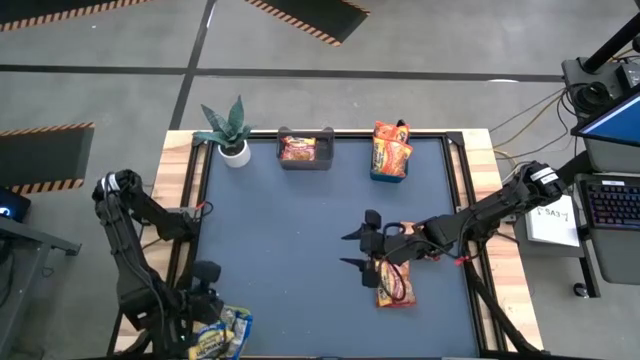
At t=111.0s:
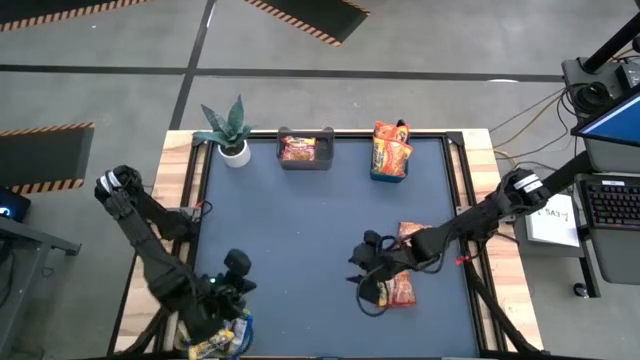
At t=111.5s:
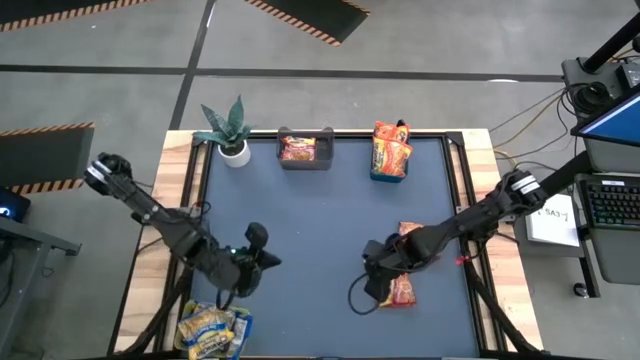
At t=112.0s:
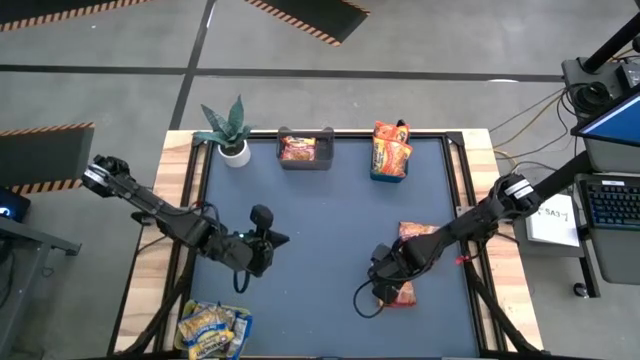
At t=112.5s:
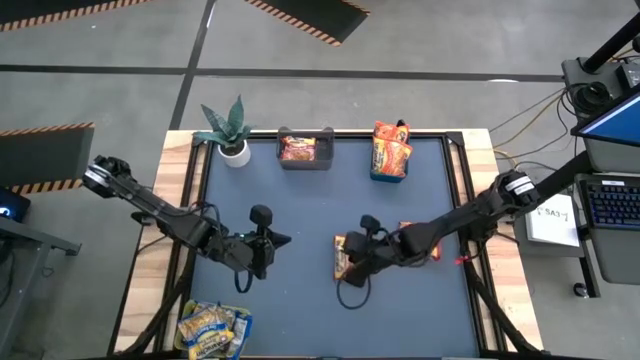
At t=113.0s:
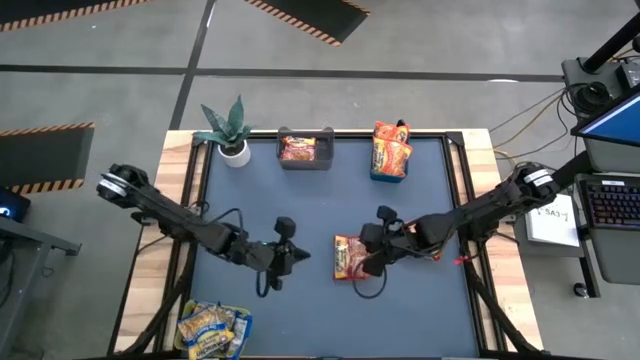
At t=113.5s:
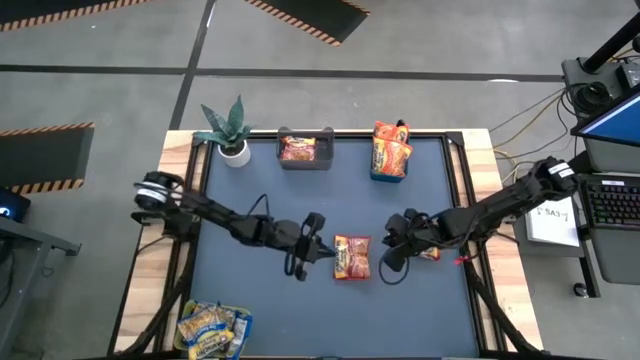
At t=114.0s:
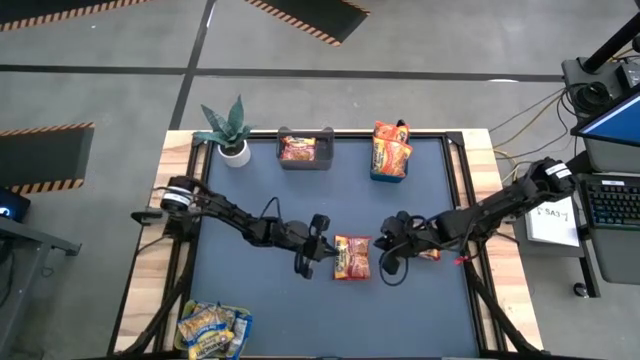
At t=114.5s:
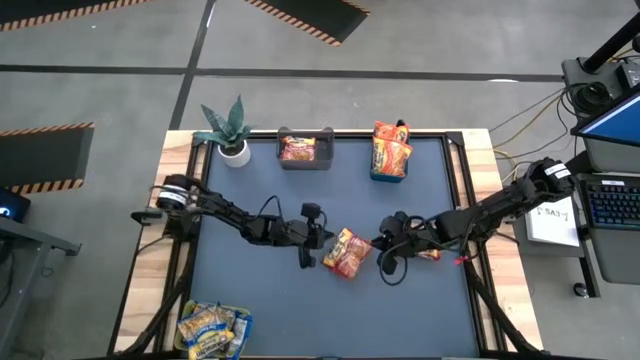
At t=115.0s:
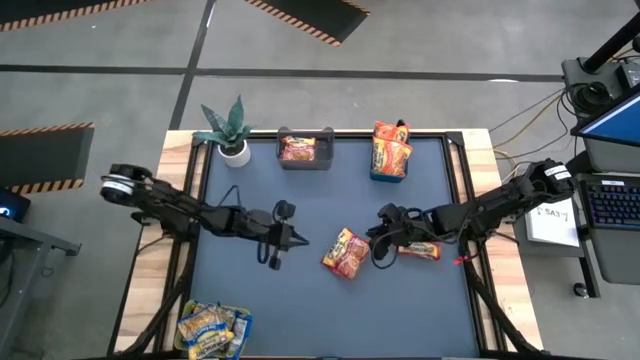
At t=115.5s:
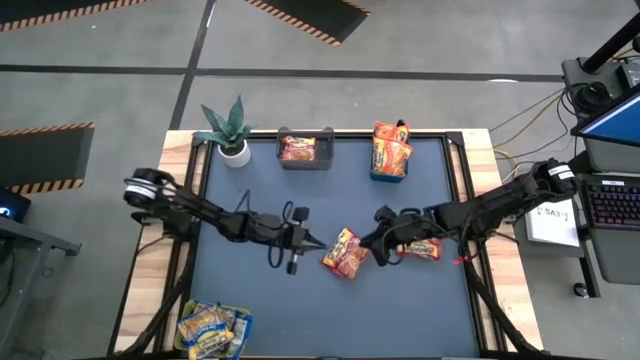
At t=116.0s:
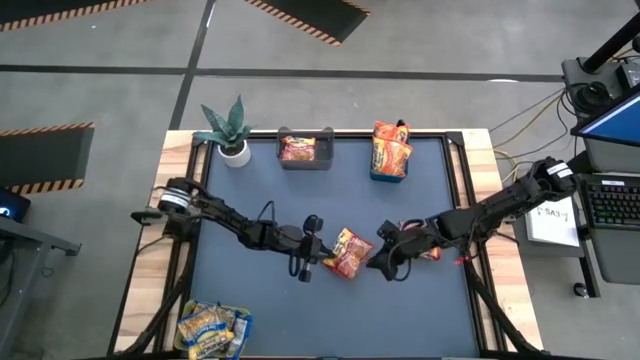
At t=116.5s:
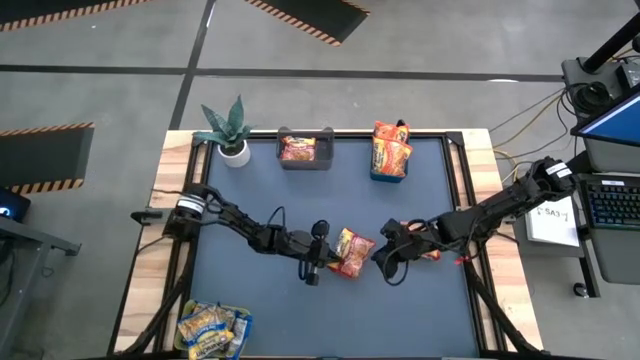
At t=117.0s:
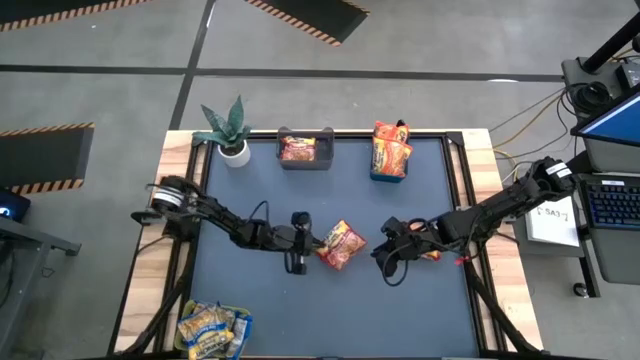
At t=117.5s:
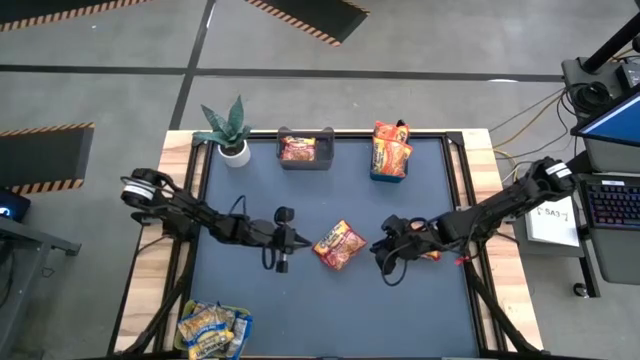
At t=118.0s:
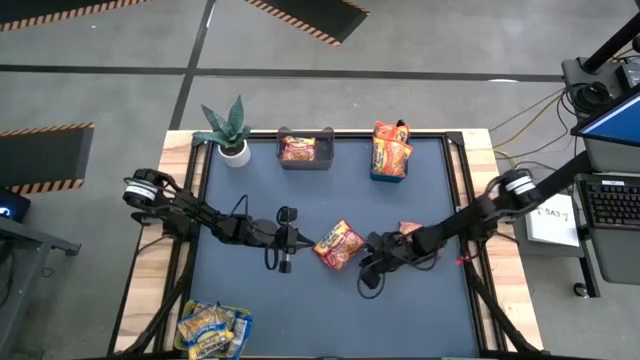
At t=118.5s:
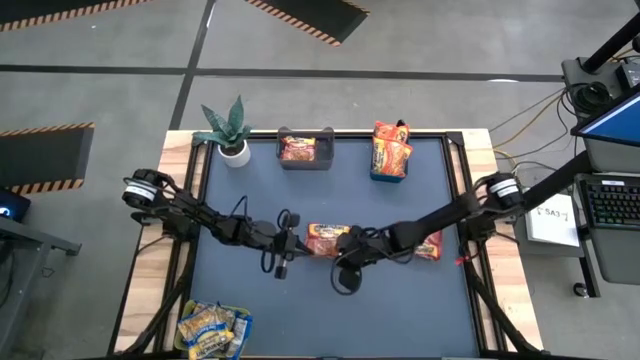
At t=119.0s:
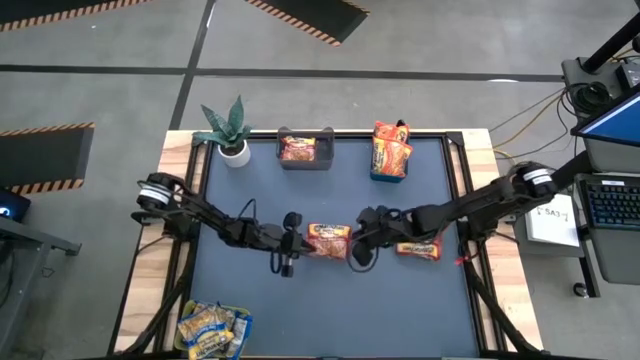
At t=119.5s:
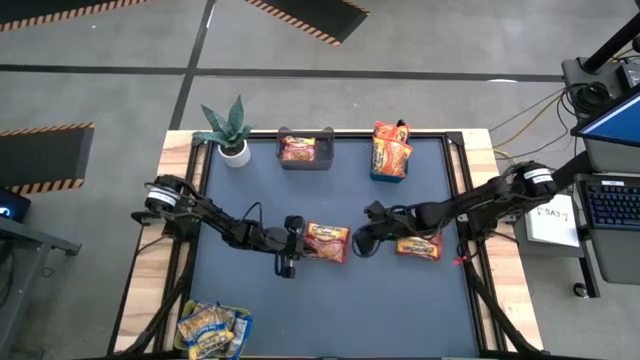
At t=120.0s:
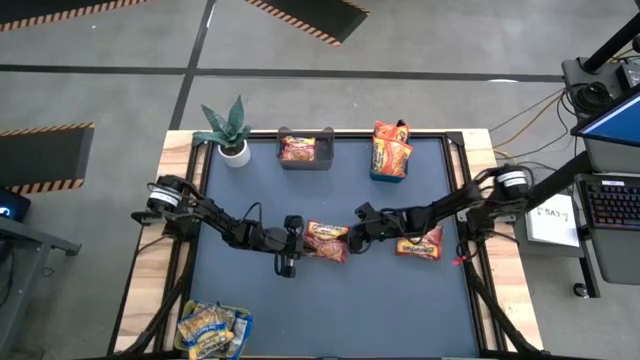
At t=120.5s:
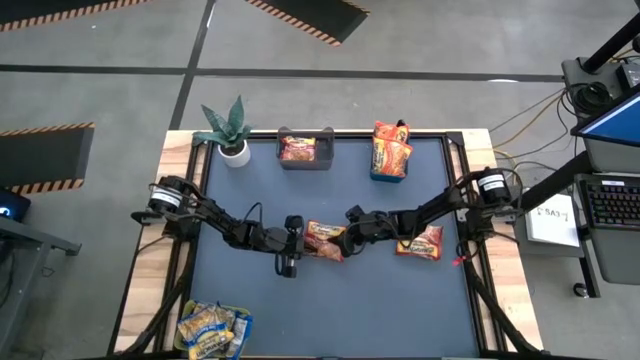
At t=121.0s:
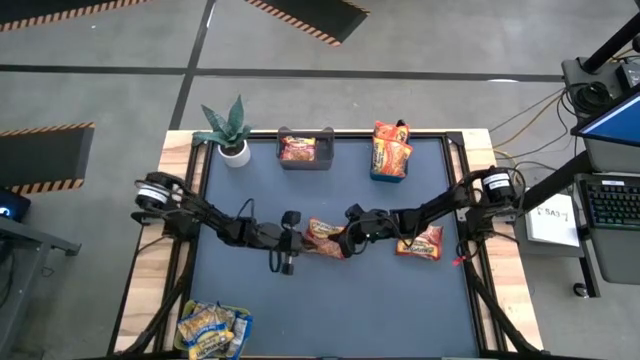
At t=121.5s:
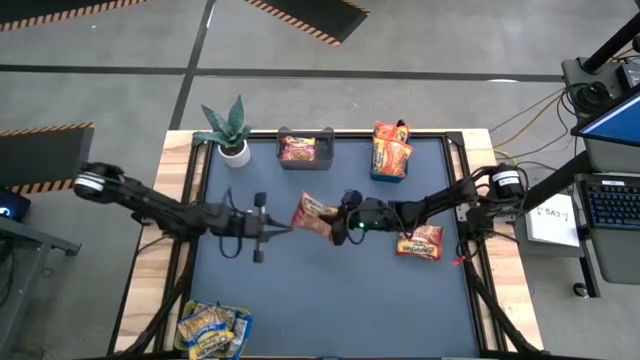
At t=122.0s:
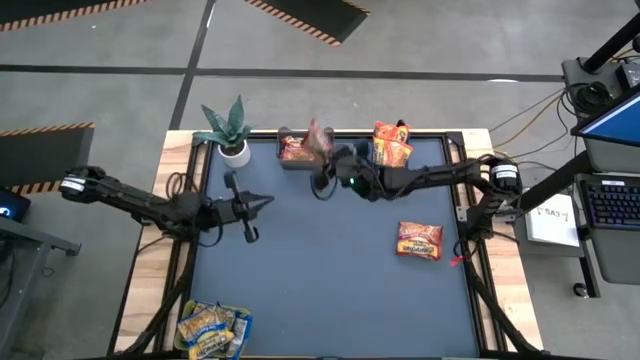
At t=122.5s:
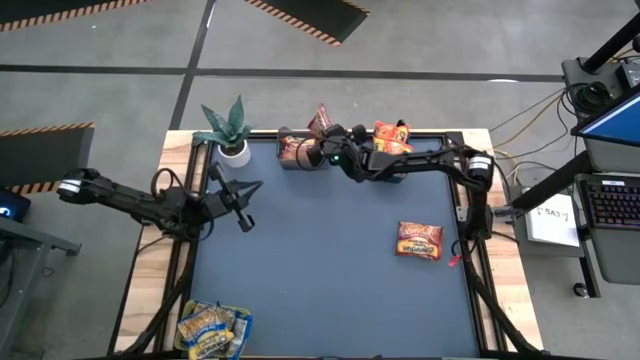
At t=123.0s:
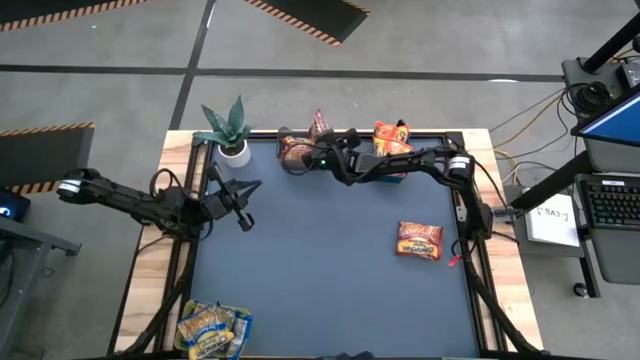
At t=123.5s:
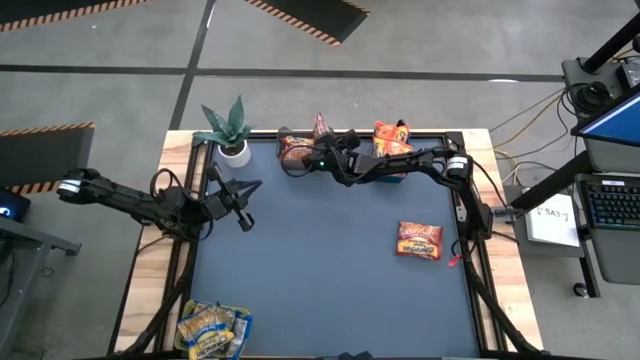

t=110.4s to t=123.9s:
Task: Sort Maruchan noodles
Put the left red noodle pack into the black bin

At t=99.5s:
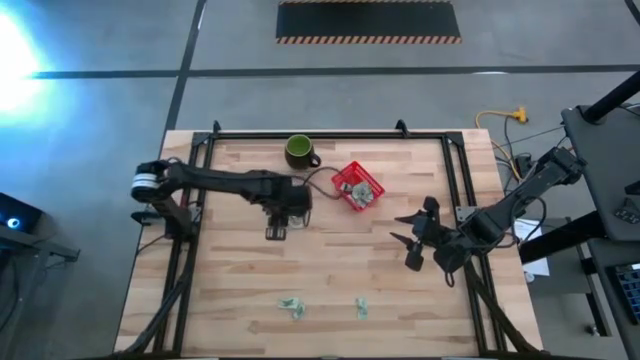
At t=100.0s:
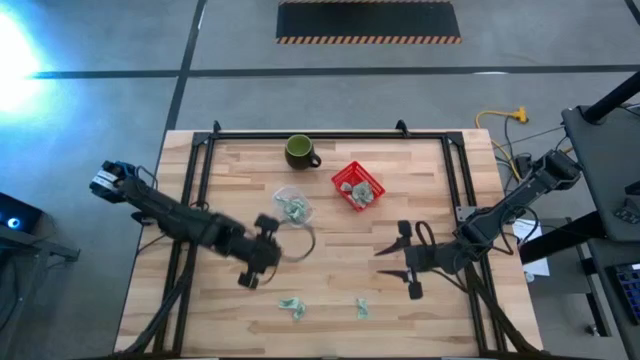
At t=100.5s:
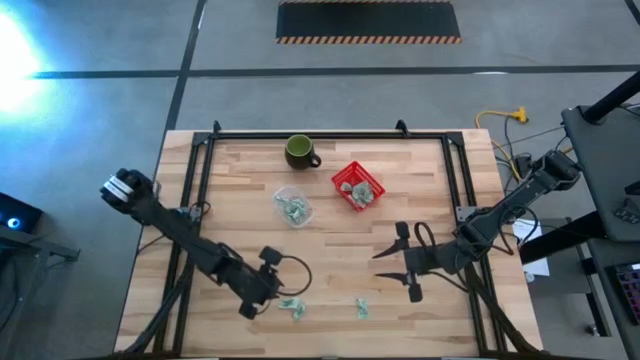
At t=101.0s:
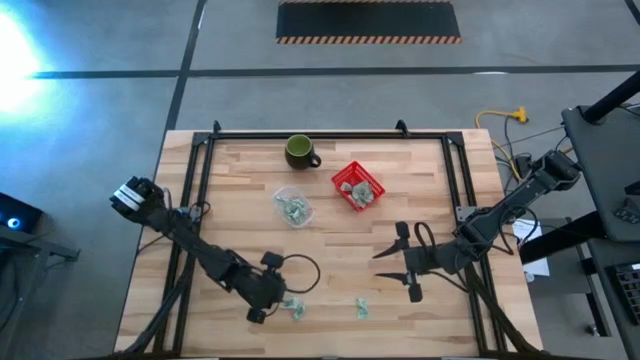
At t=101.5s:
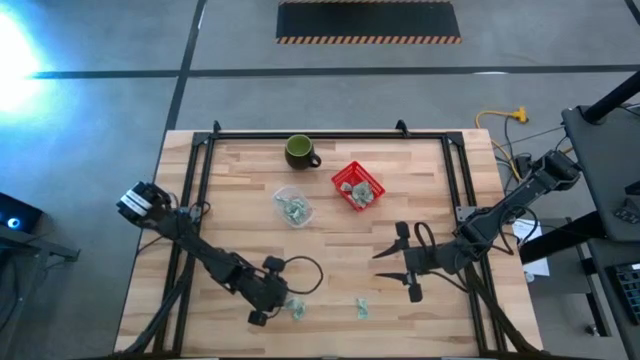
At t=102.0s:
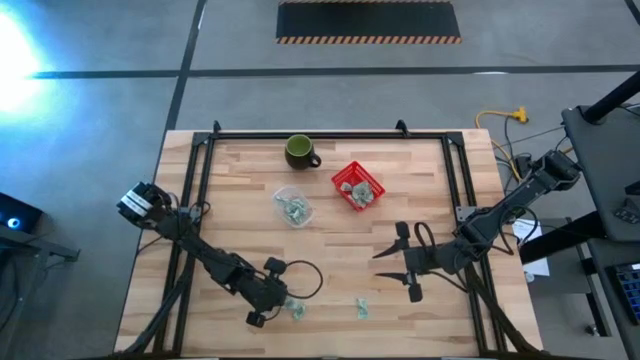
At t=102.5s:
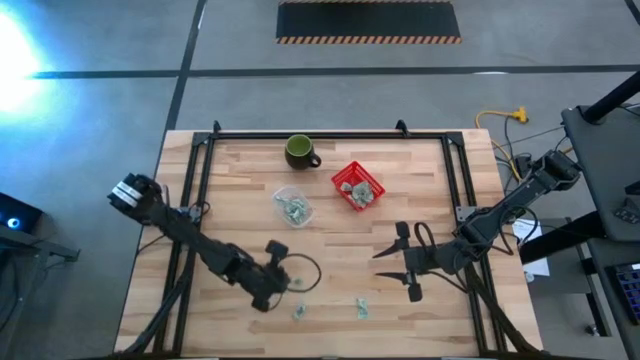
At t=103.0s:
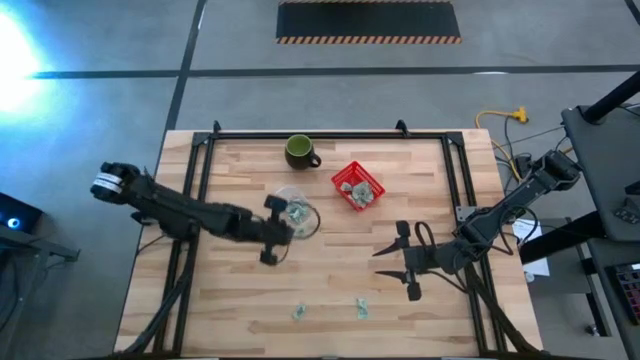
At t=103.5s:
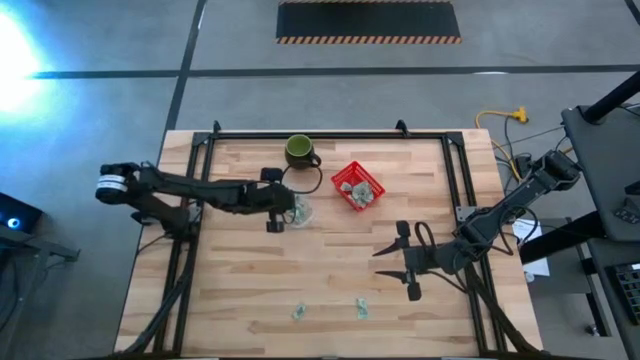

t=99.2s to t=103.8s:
Task: Pick and place items into bin
Put the stevia packet into the transparent bin

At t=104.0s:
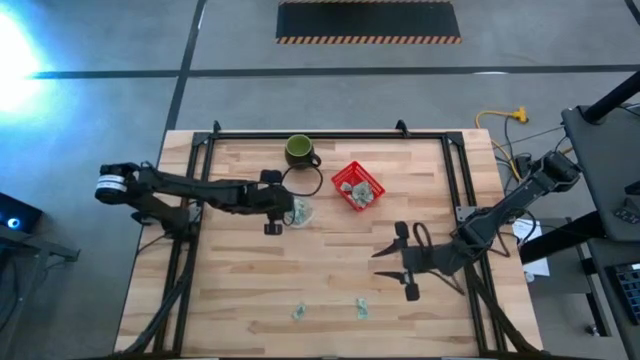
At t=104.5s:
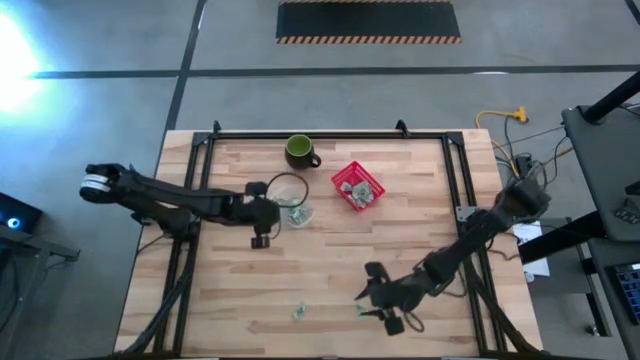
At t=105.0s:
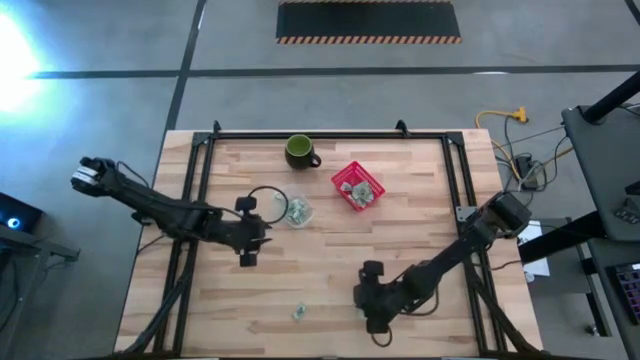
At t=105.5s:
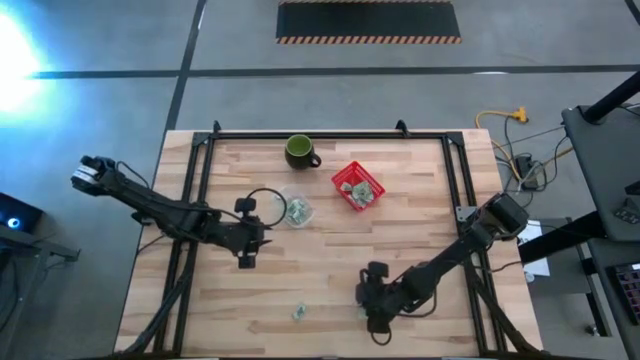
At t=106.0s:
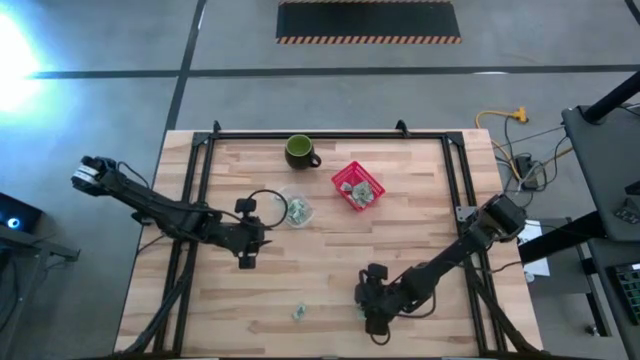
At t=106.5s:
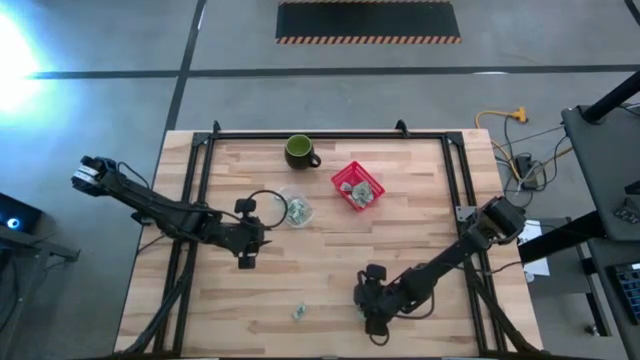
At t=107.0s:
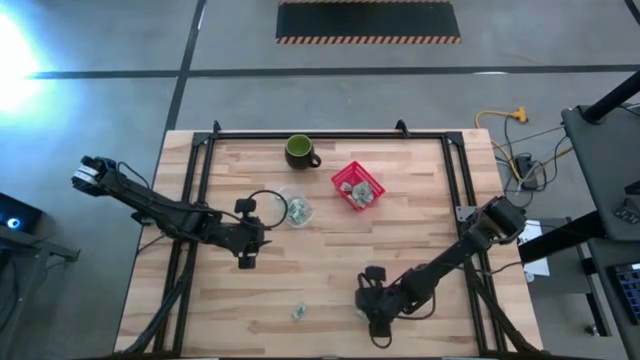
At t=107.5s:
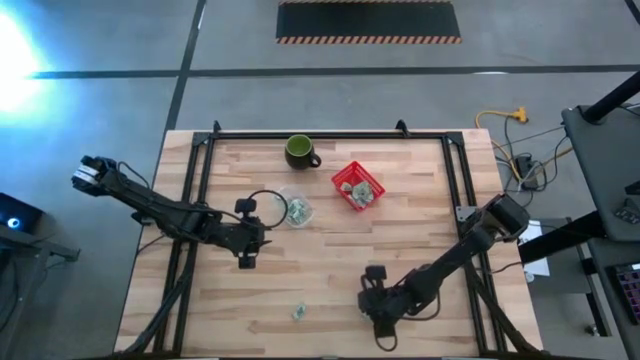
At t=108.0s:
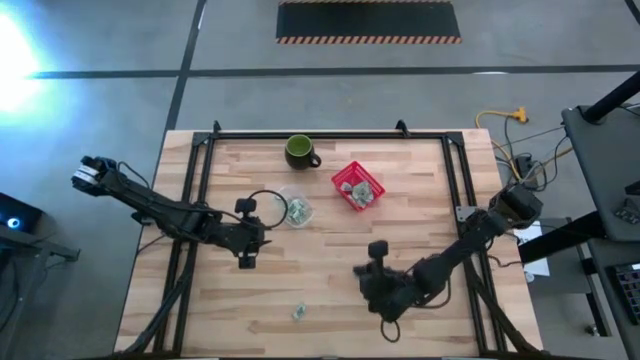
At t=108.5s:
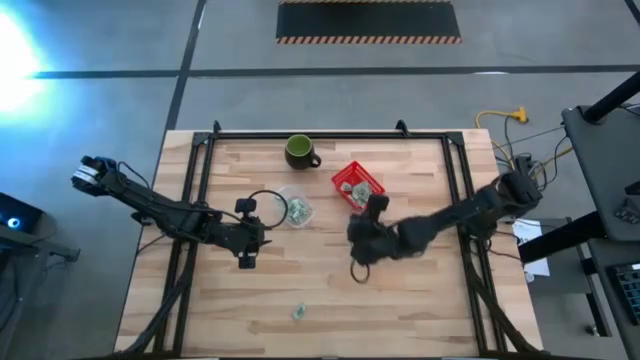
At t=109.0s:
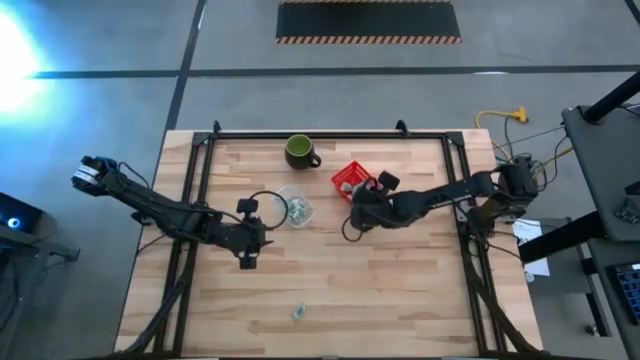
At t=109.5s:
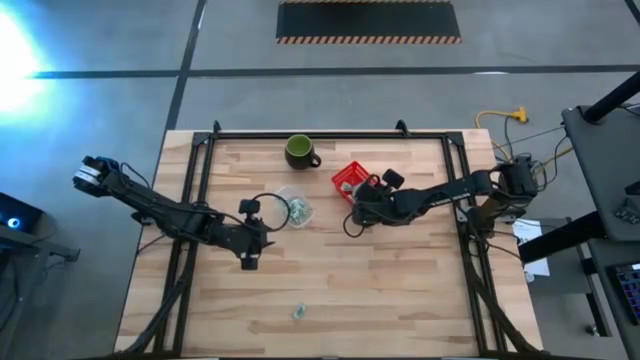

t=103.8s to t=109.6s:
Put the stevia packet into the red bin
